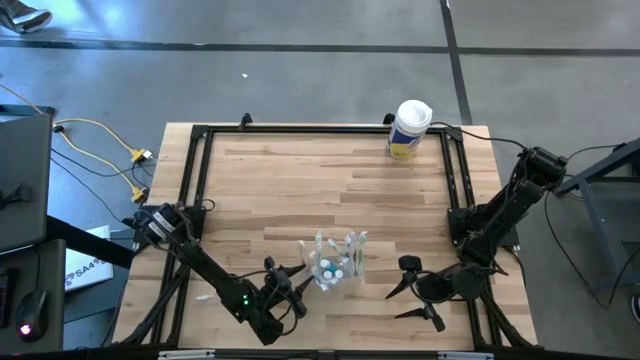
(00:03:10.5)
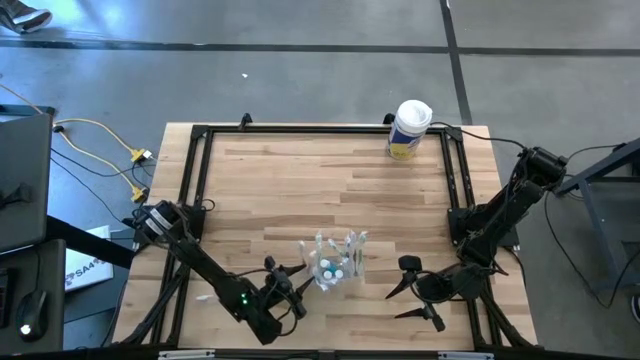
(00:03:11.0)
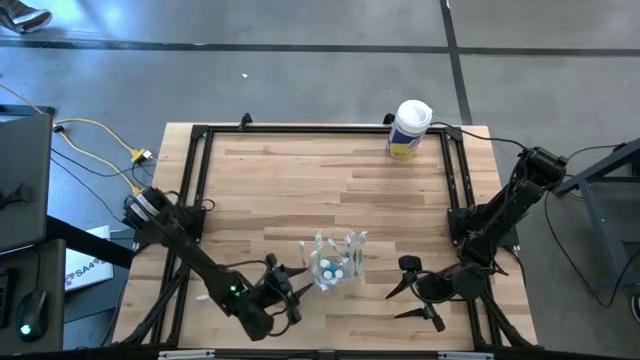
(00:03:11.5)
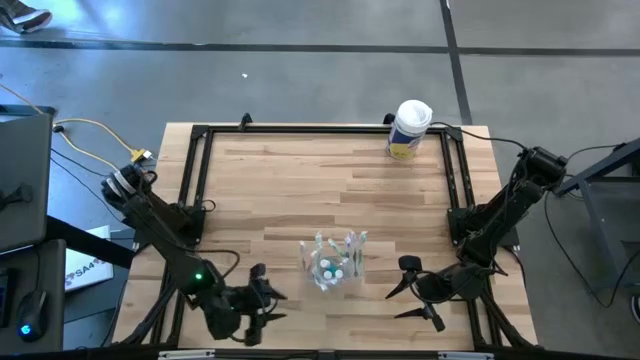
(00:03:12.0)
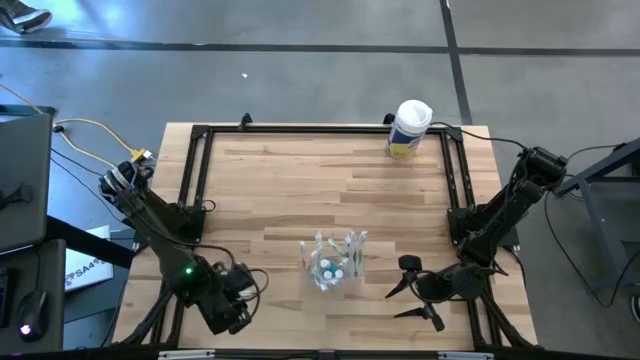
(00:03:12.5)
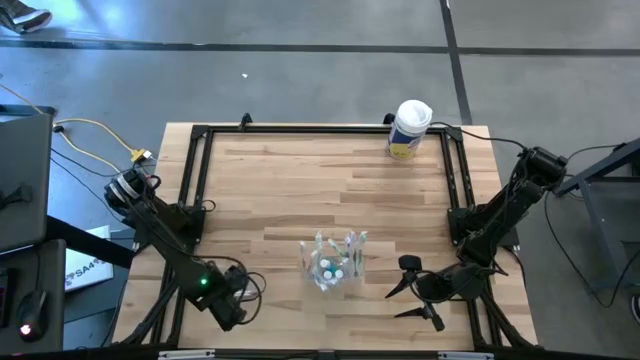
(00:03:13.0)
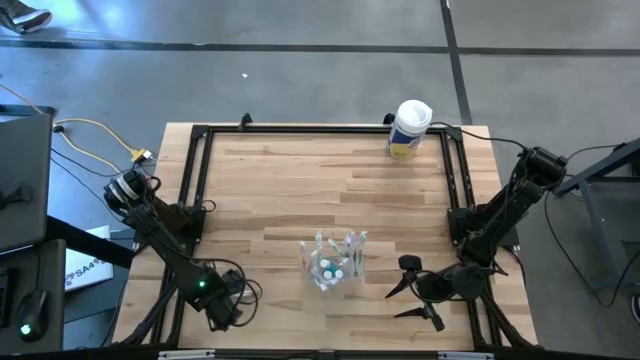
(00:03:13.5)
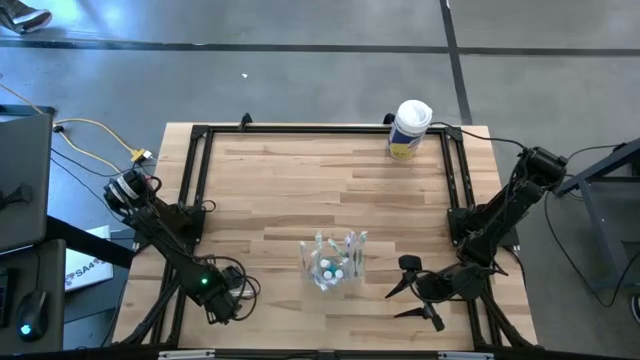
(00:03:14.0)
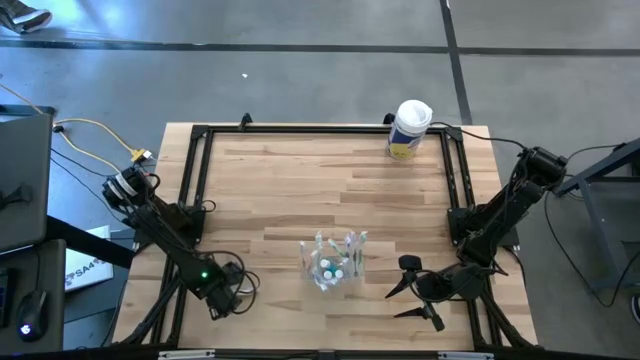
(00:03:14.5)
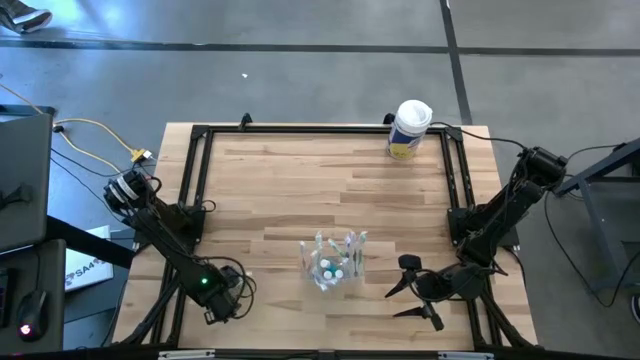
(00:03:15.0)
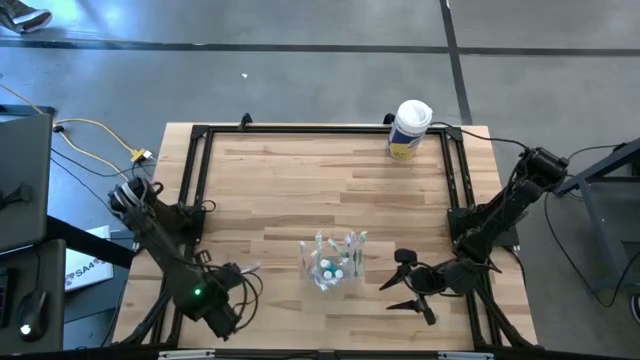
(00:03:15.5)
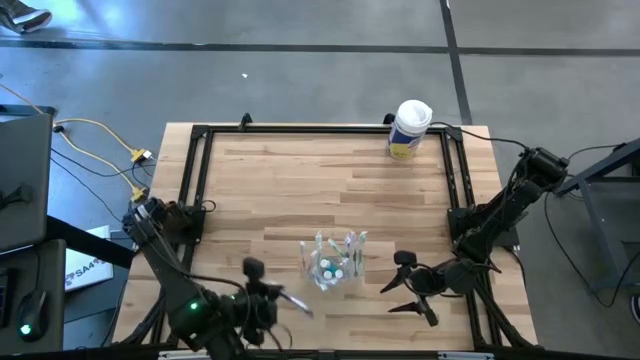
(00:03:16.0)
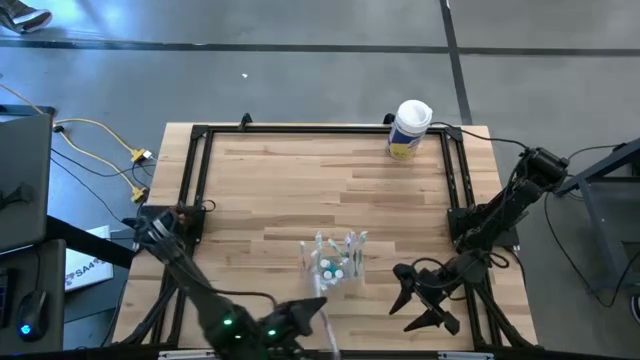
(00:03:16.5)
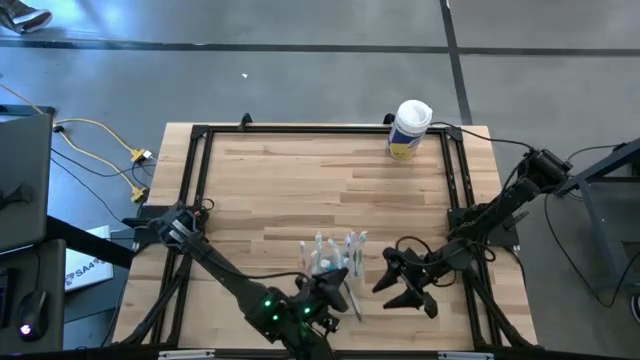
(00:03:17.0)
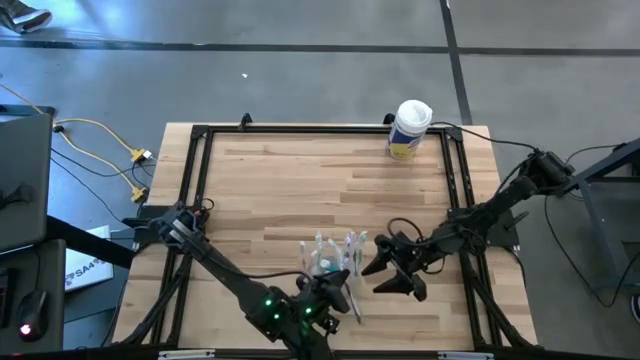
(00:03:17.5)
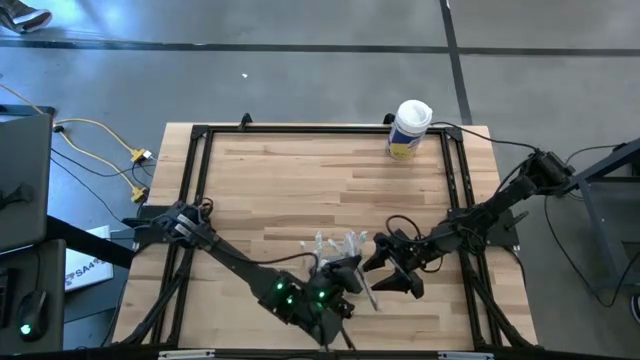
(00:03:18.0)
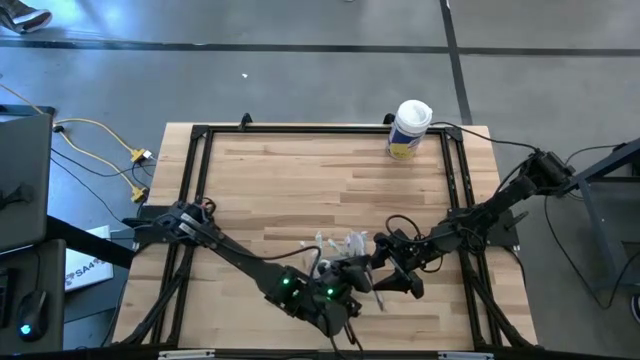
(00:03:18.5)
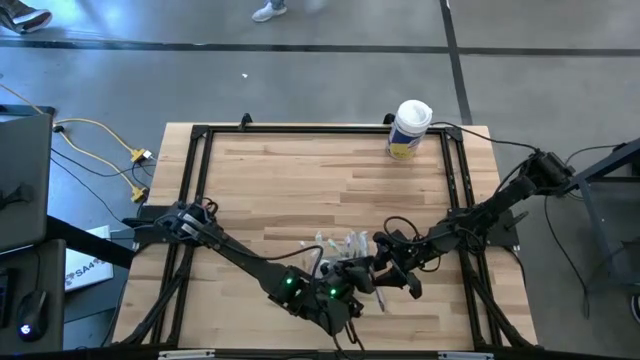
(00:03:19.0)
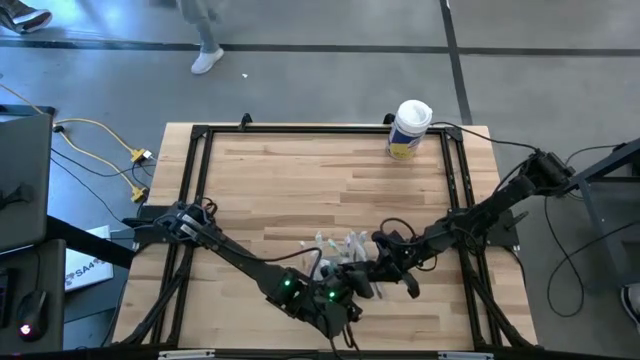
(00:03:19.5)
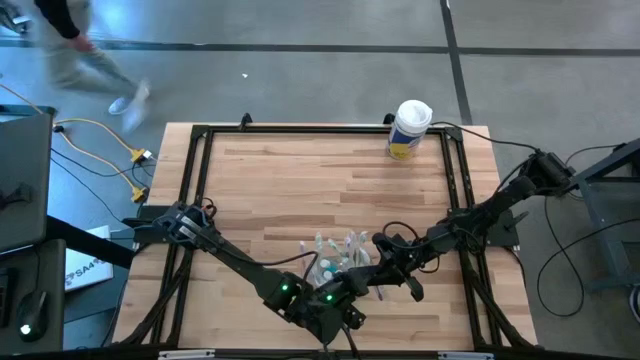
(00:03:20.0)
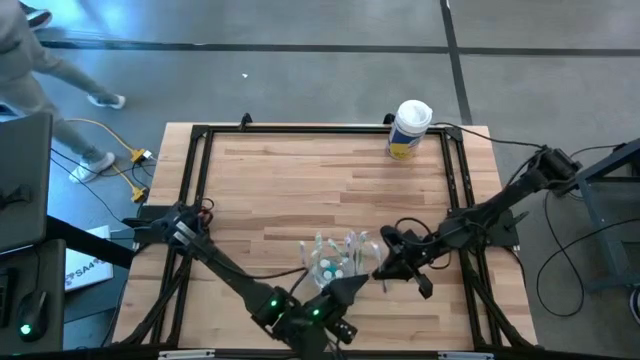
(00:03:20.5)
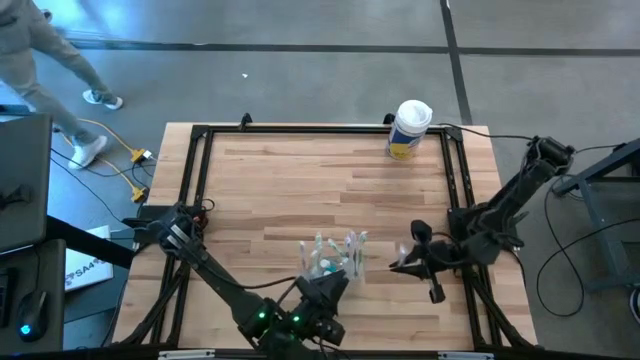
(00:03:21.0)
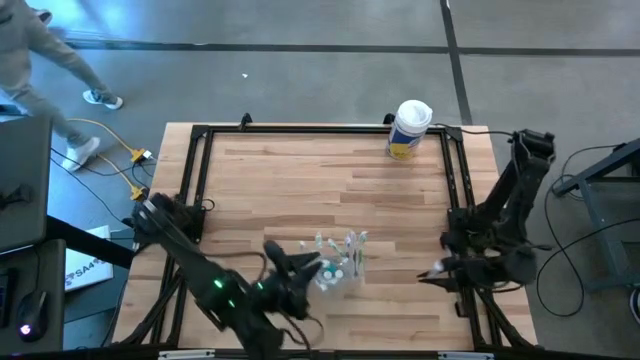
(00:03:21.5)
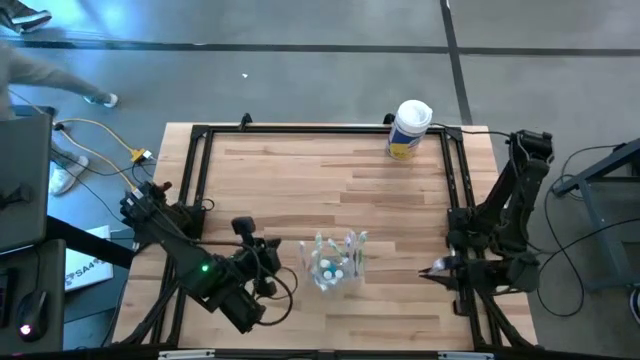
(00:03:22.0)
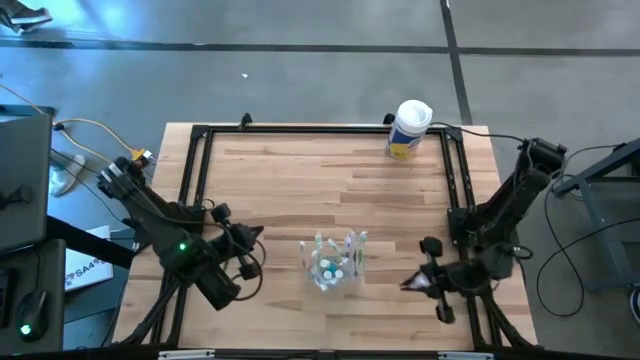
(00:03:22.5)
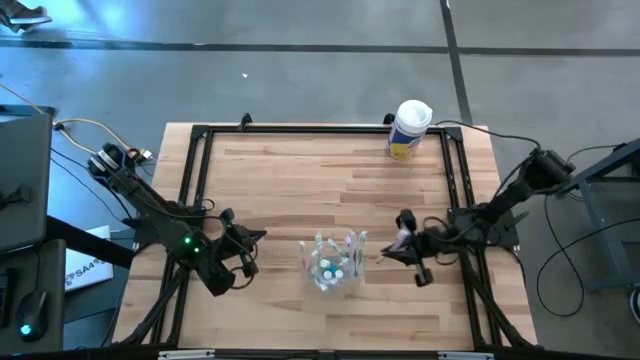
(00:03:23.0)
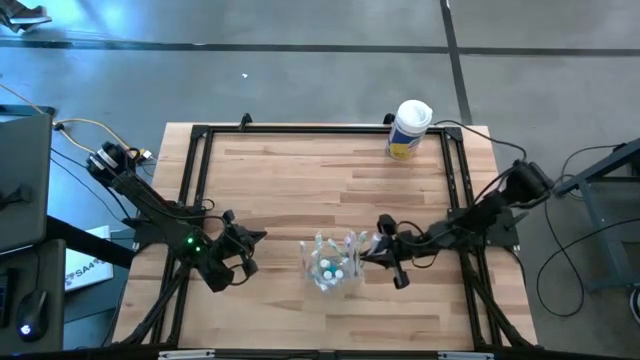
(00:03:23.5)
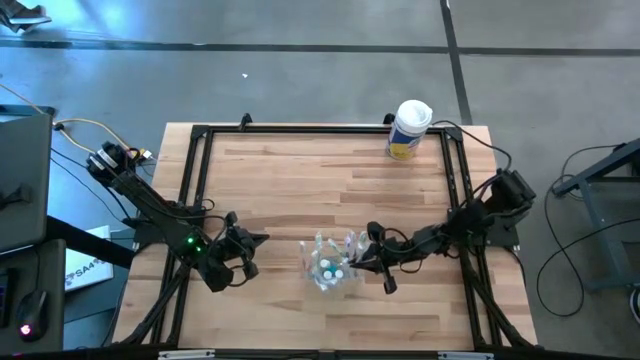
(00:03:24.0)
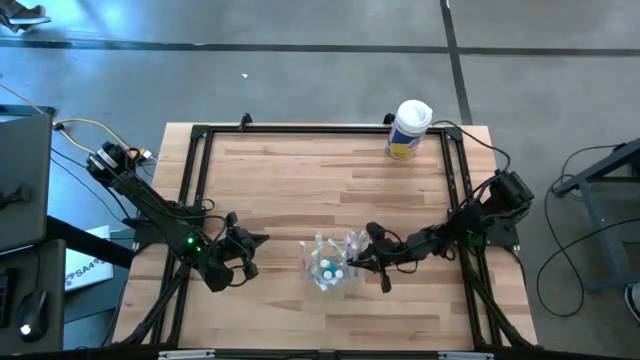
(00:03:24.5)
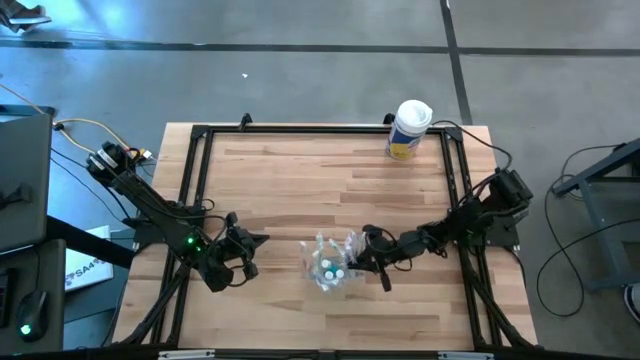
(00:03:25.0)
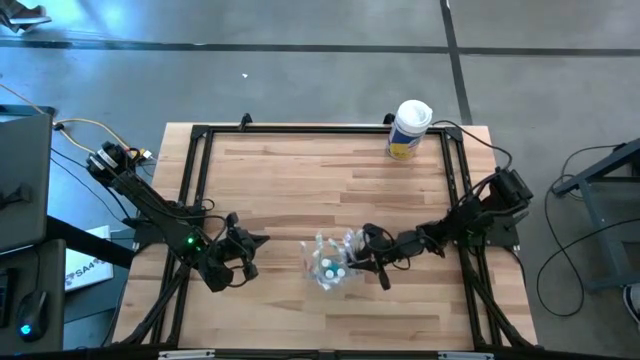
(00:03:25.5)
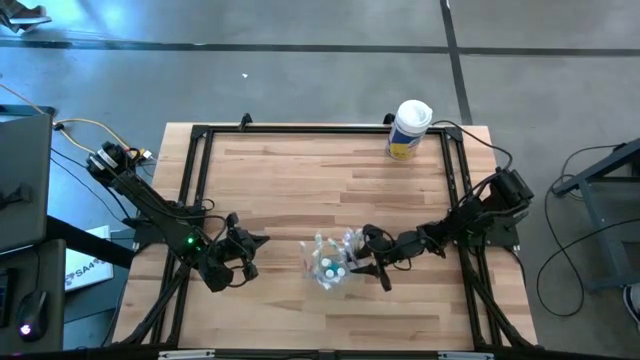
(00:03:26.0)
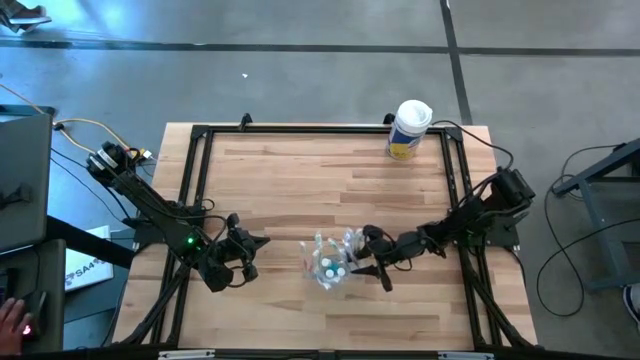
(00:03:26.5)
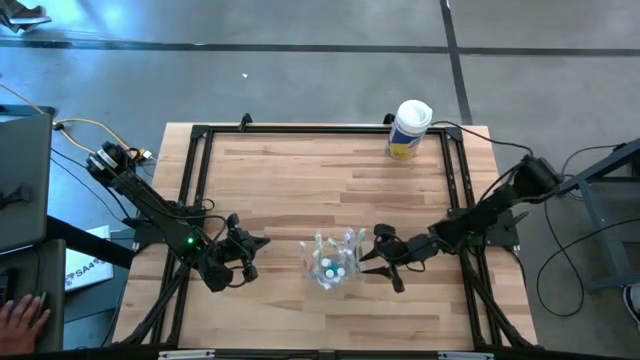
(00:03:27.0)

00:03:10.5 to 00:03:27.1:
Task: Pick & Place toothbrushing station
Put the purple toothbrush into the transparent organizer

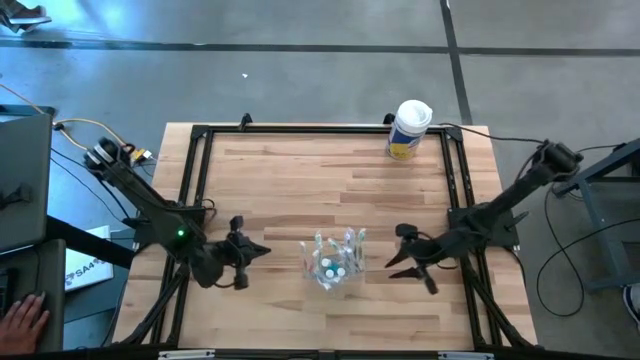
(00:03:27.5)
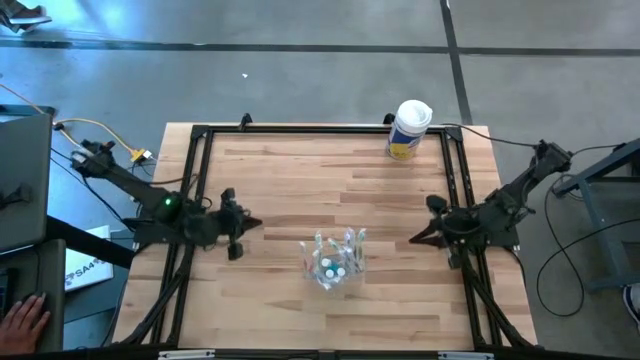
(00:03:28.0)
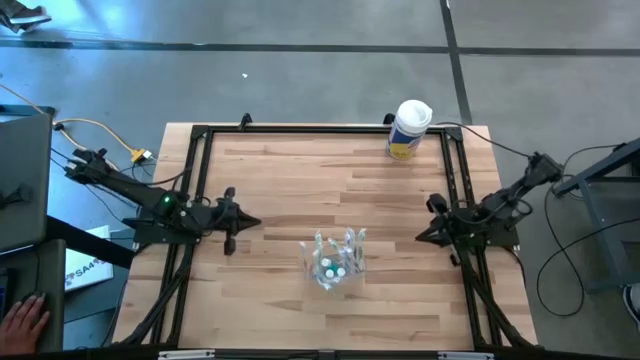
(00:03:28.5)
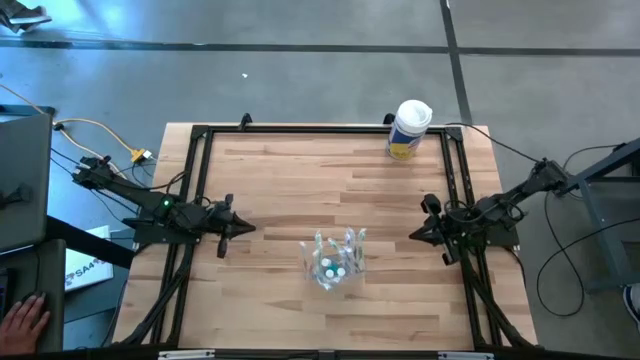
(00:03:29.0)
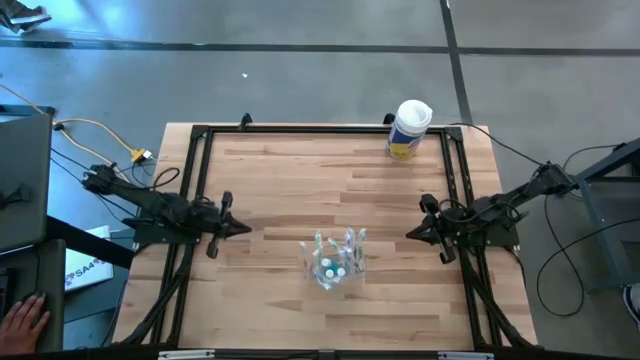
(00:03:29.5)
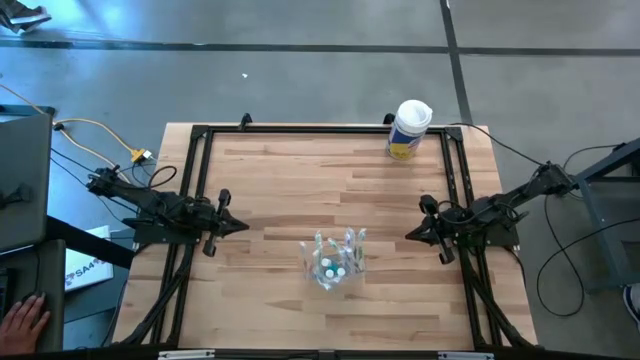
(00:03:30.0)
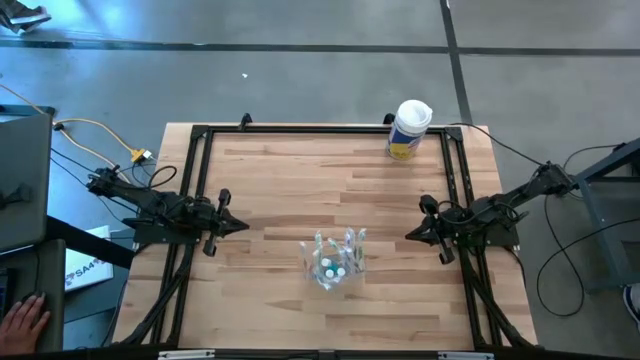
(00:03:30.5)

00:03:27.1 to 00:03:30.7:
Return to Home Position
